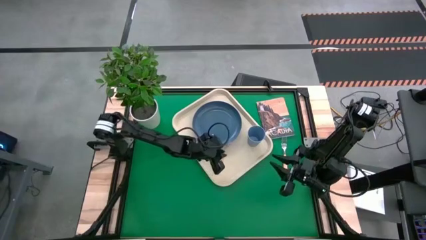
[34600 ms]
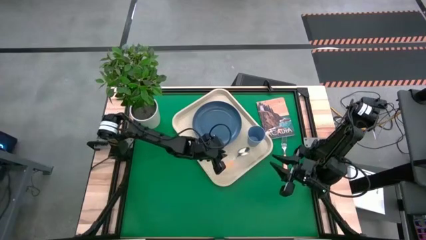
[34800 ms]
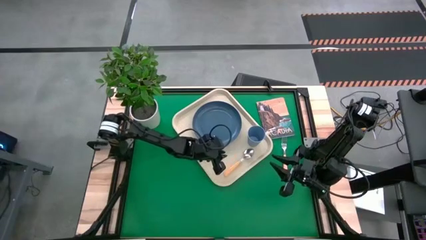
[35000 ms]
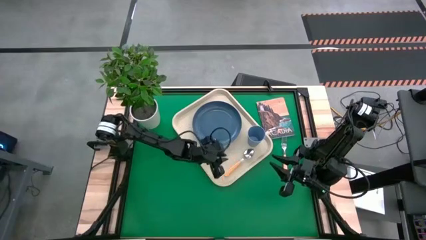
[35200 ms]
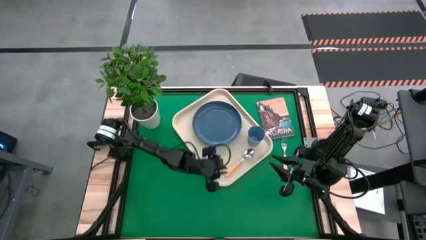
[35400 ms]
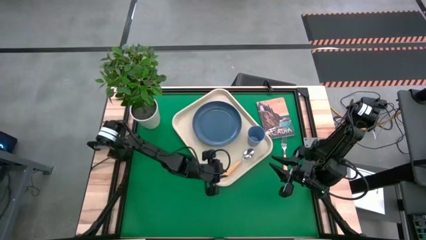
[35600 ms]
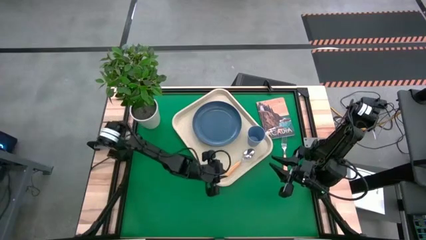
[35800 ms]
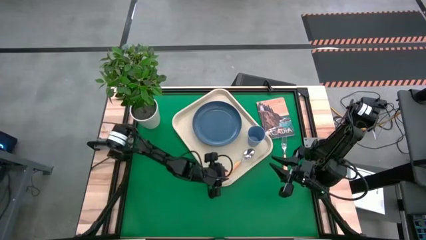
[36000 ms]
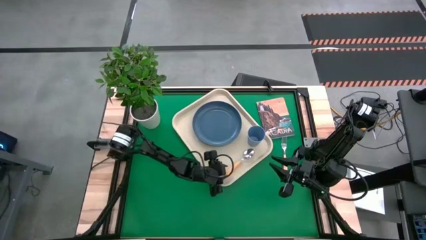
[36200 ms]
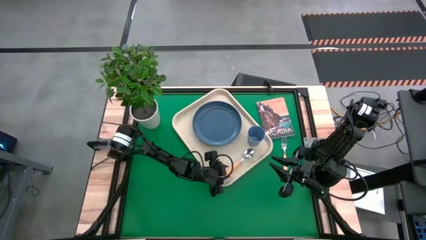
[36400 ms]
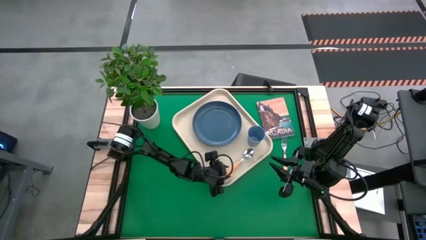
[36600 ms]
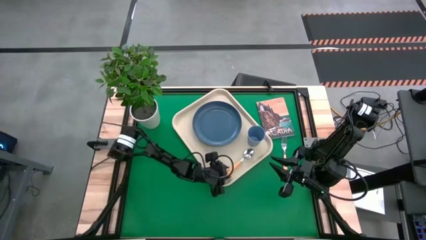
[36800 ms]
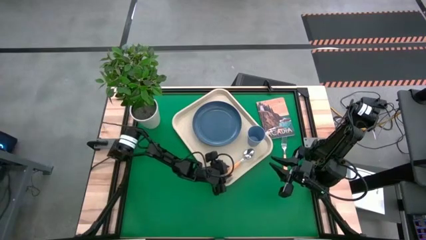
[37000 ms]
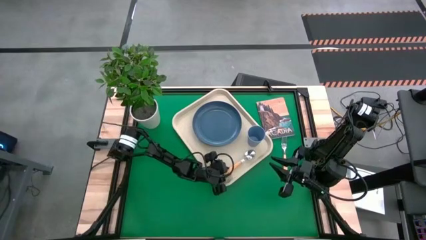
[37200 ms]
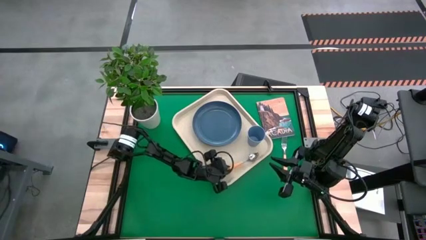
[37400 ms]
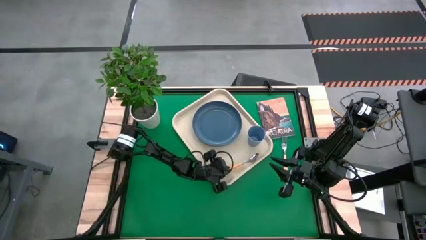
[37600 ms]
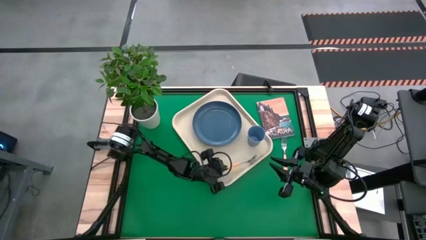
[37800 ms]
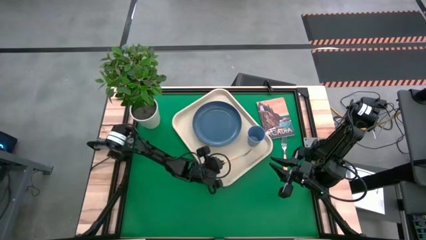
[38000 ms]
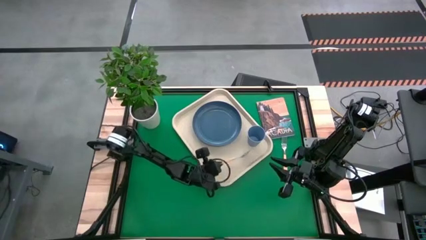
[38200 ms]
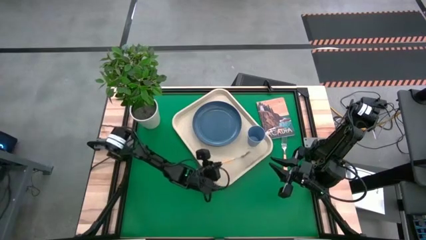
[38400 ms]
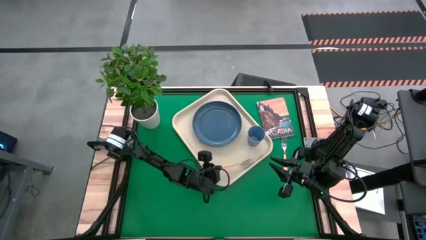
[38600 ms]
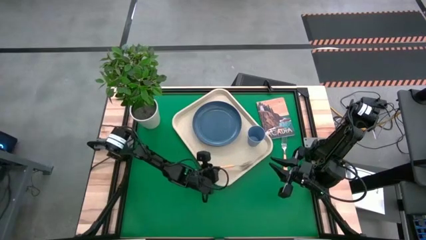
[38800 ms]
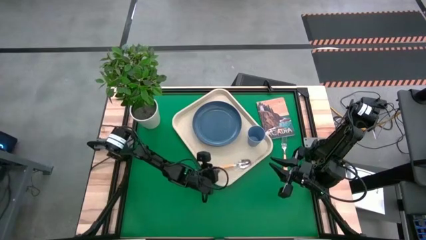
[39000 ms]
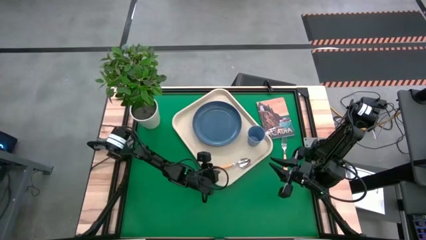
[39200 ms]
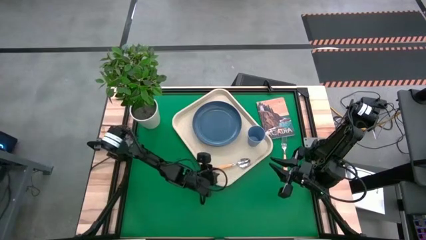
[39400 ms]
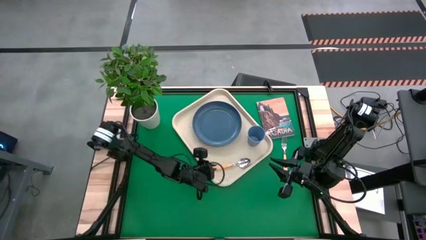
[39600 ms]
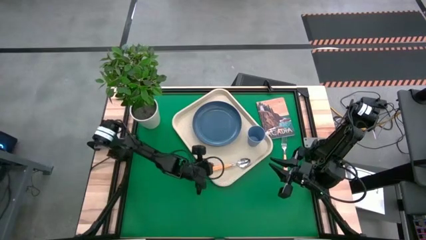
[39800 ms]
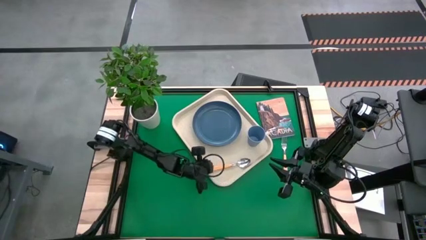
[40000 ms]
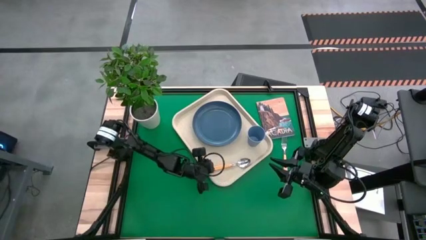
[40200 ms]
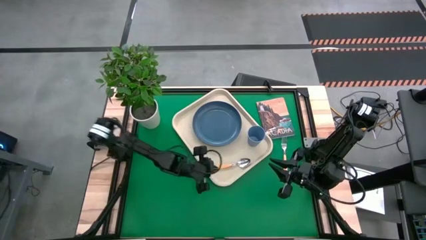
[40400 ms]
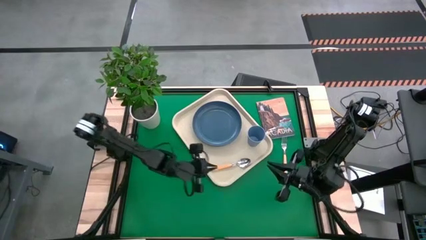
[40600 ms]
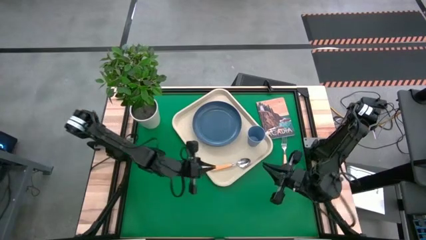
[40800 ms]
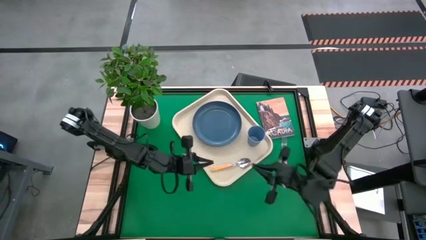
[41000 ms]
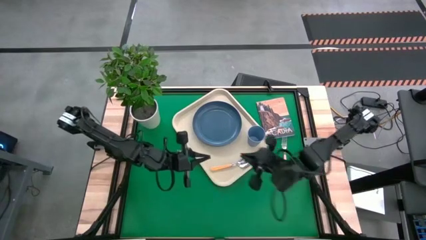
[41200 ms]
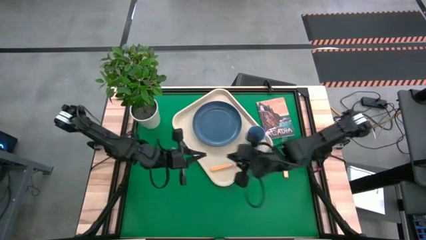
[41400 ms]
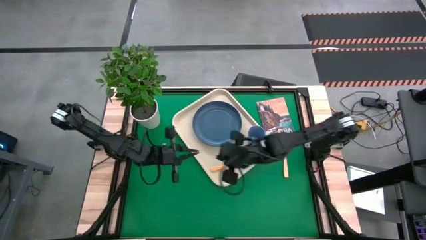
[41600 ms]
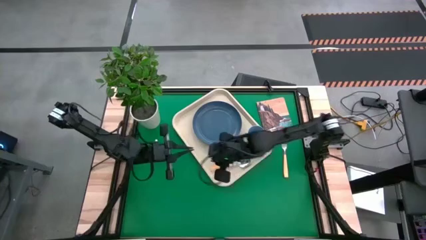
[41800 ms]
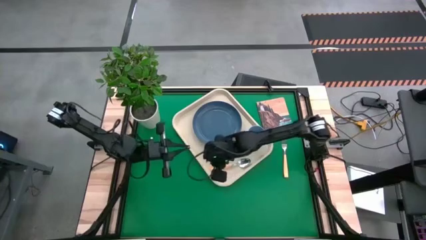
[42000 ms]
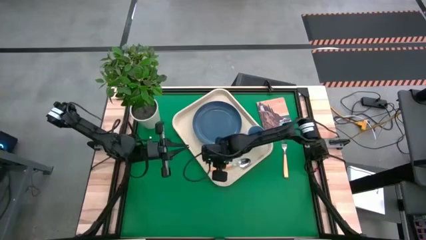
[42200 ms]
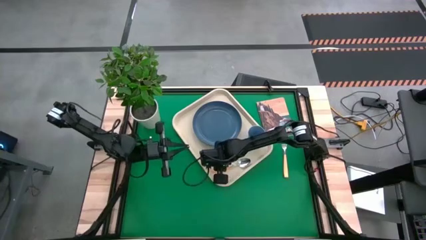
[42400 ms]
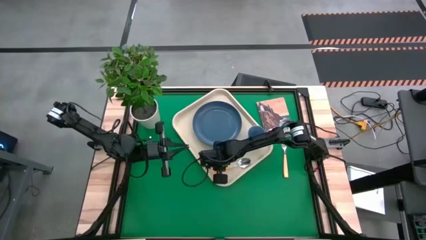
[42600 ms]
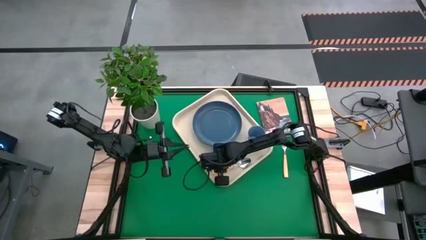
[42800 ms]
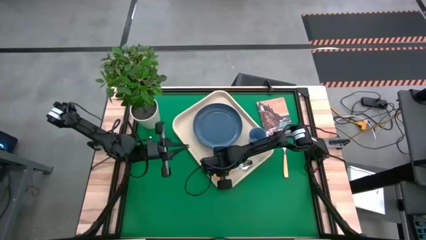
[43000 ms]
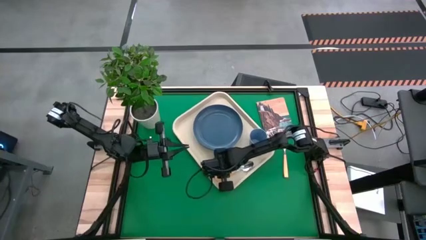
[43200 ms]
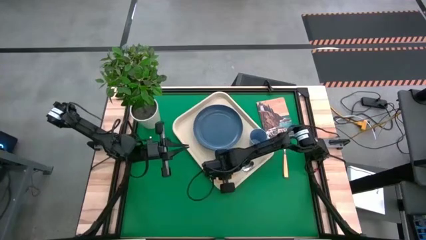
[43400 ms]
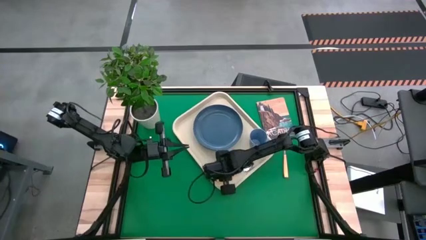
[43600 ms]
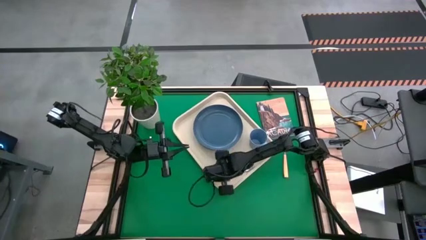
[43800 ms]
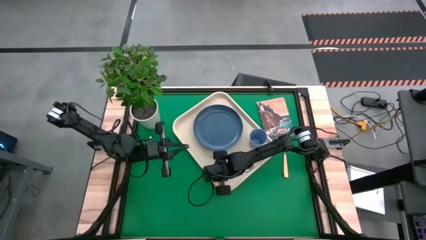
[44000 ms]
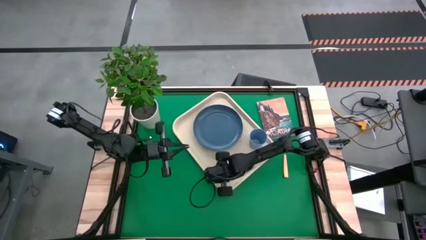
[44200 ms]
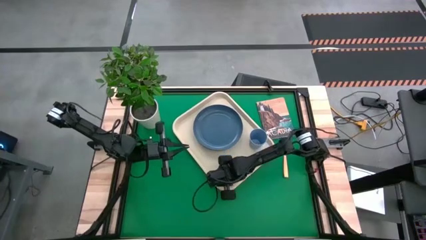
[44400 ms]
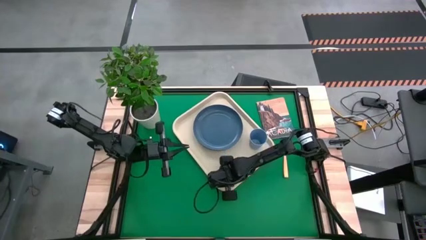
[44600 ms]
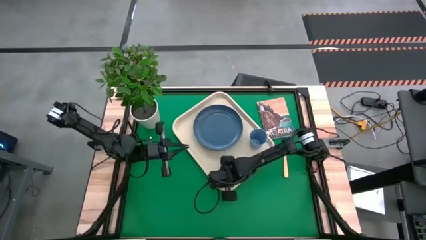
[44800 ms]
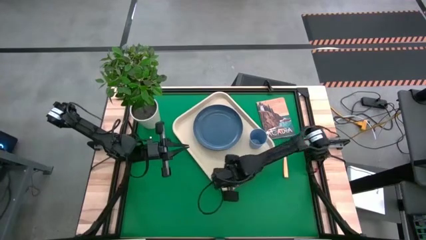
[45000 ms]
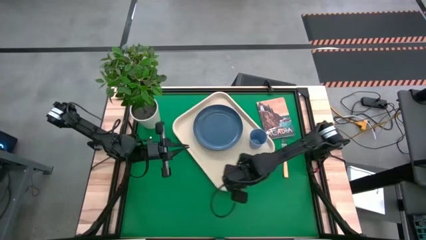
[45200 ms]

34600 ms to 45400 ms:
Task: Pick and place plate/cup/fork/spoon on tray
Put the spoon on the white serving tray to the bottom of the blue cup

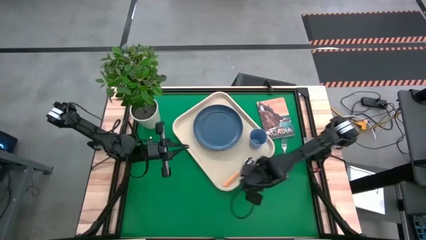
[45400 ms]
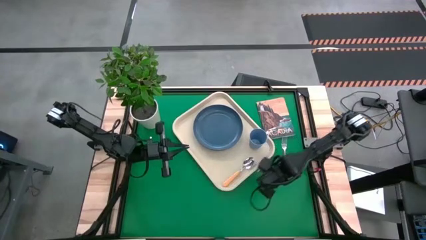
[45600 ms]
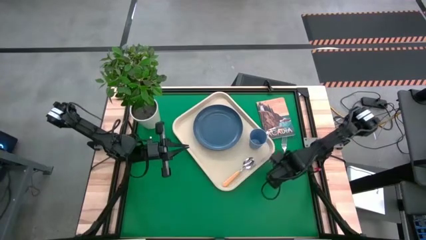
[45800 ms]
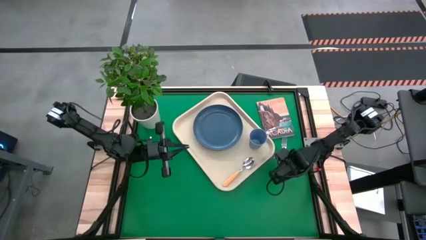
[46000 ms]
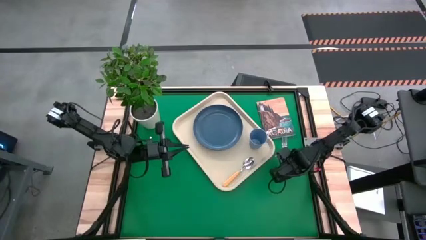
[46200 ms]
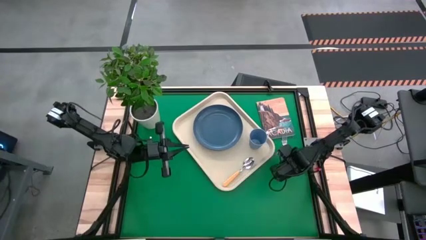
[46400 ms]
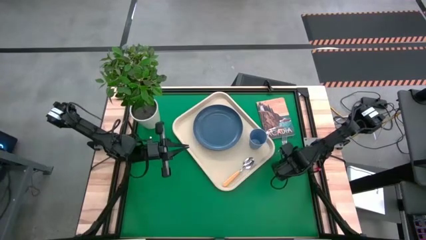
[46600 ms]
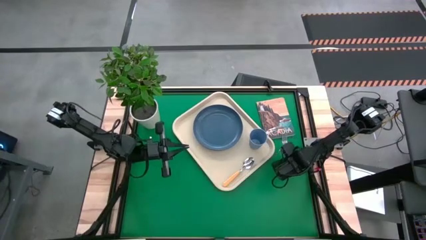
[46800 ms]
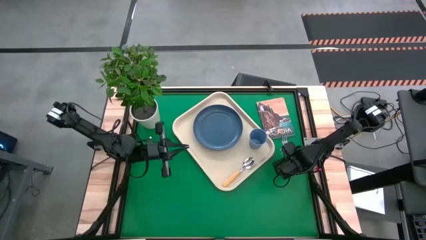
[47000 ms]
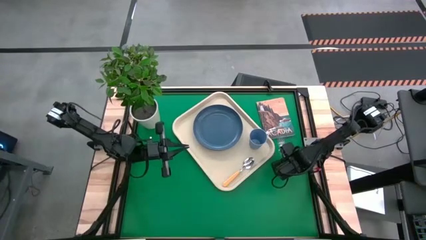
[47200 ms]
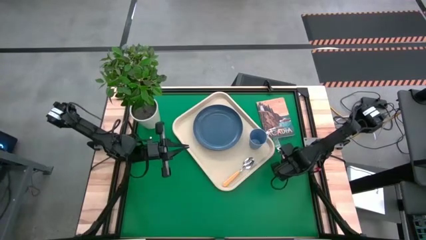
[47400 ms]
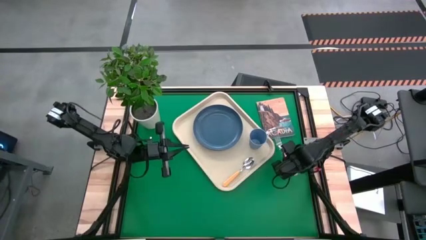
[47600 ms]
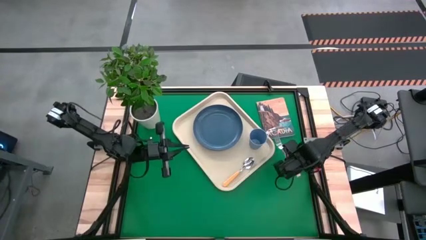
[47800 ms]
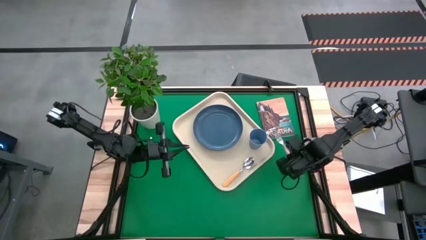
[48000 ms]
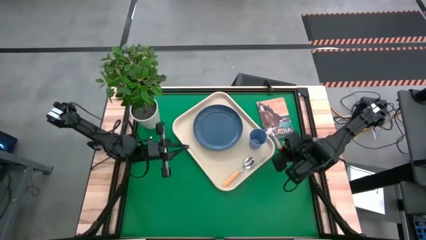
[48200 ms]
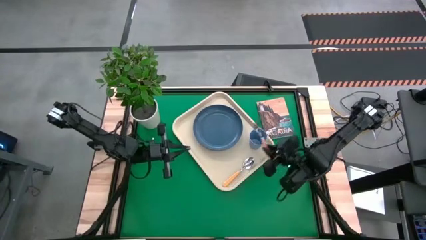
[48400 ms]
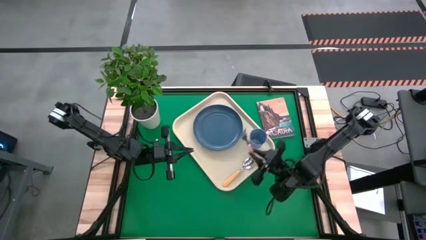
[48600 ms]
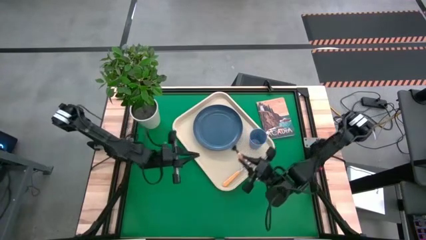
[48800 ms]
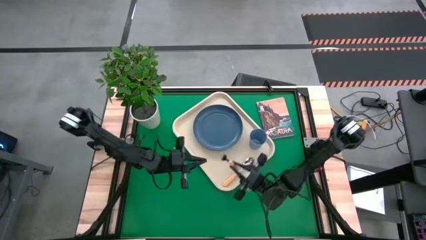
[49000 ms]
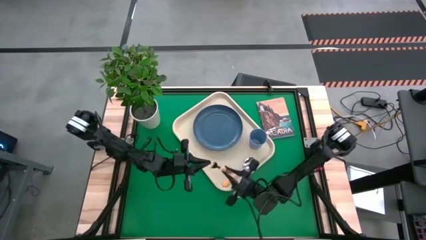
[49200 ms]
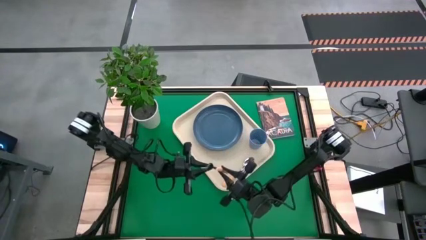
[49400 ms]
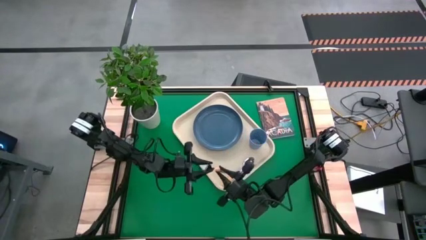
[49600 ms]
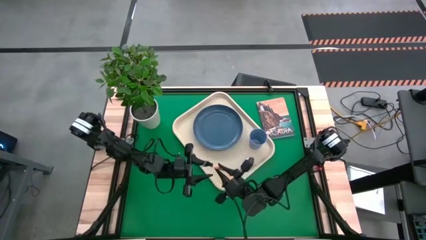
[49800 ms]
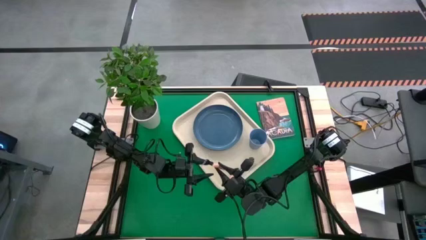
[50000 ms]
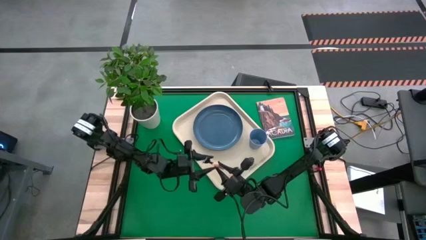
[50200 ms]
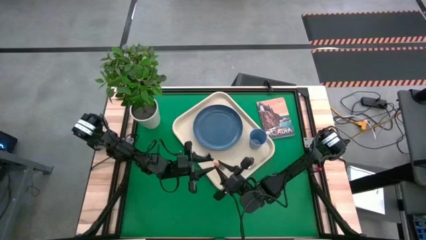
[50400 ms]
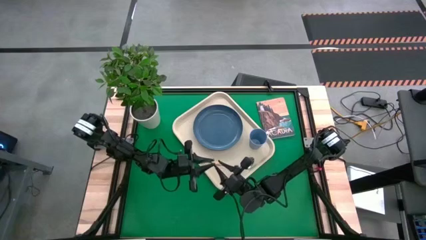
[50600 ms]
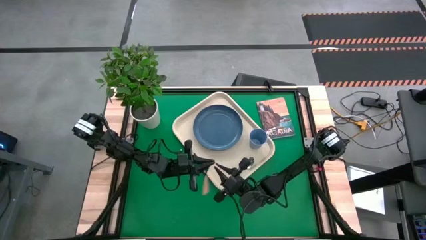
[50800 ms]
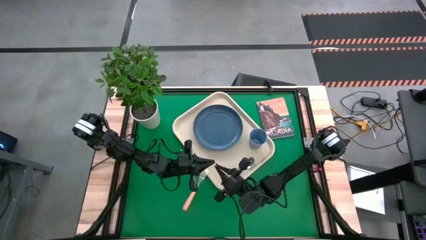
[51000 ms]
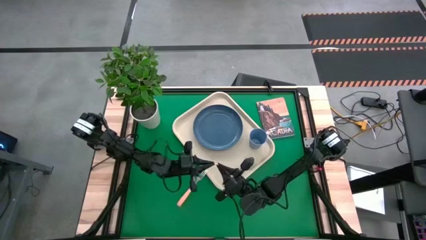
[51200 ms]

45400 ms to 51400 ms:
Put the fork on the white serving tray to the left side of the blue plate
